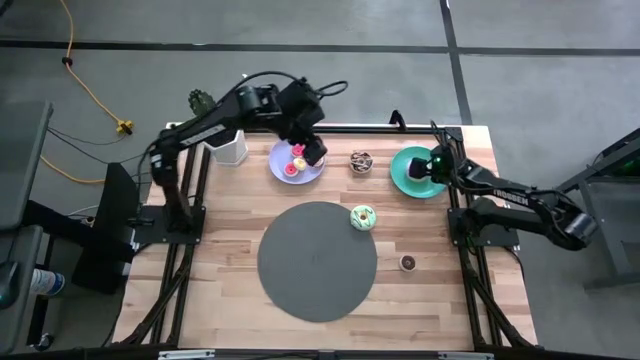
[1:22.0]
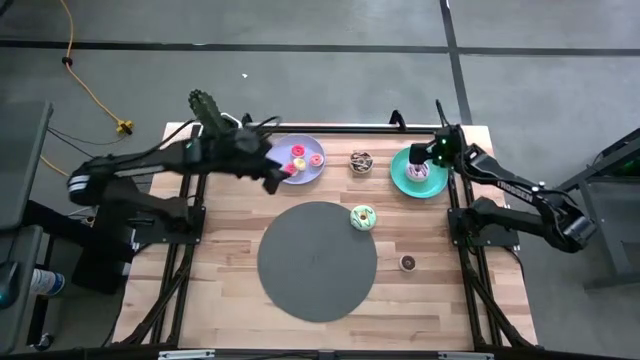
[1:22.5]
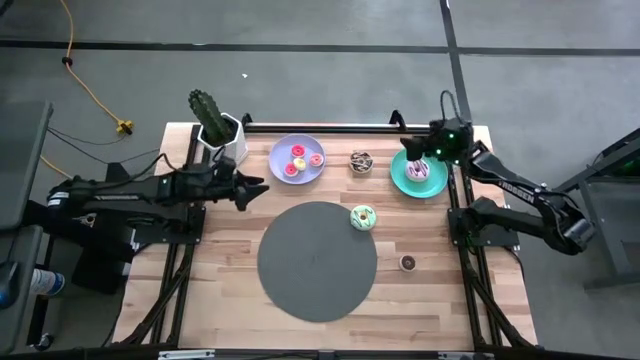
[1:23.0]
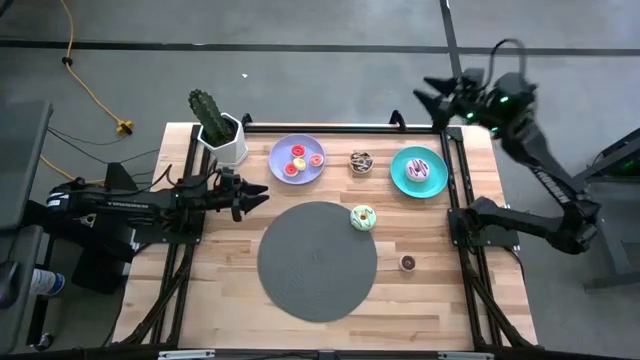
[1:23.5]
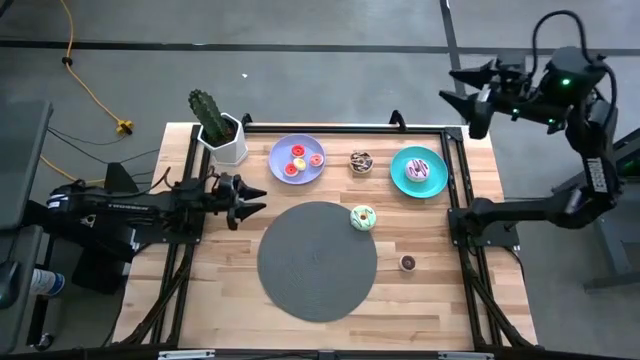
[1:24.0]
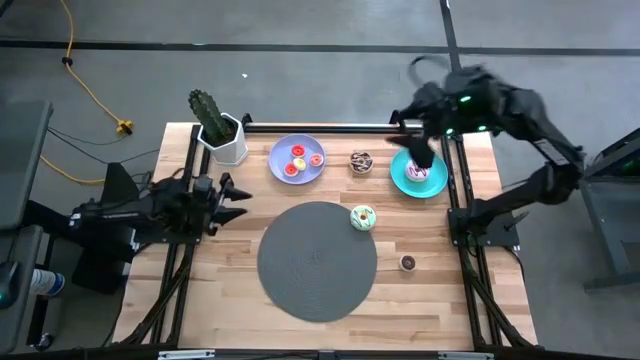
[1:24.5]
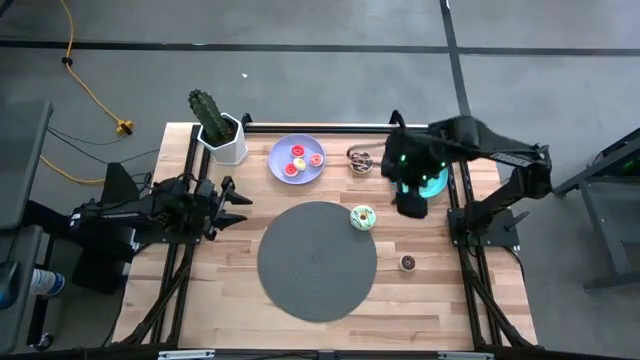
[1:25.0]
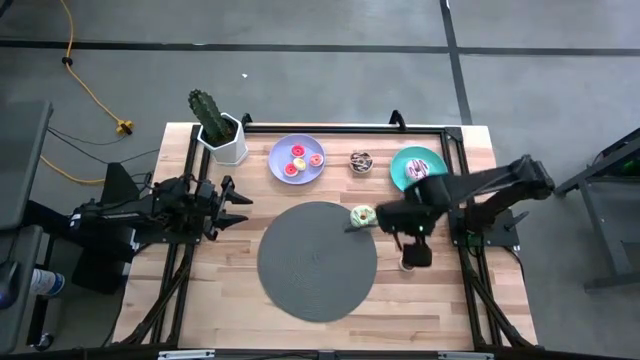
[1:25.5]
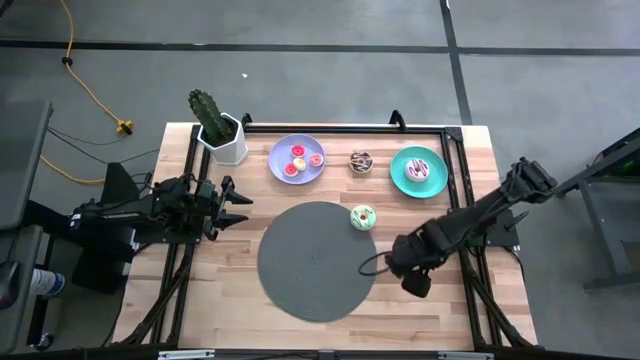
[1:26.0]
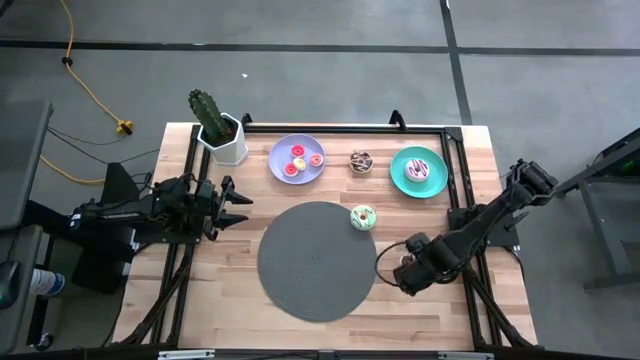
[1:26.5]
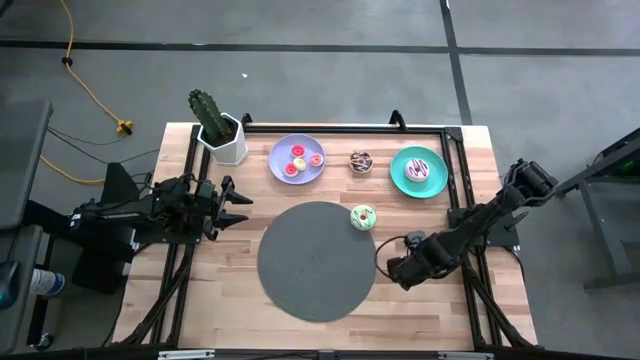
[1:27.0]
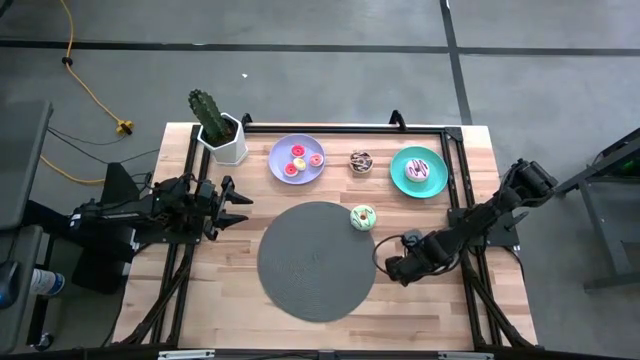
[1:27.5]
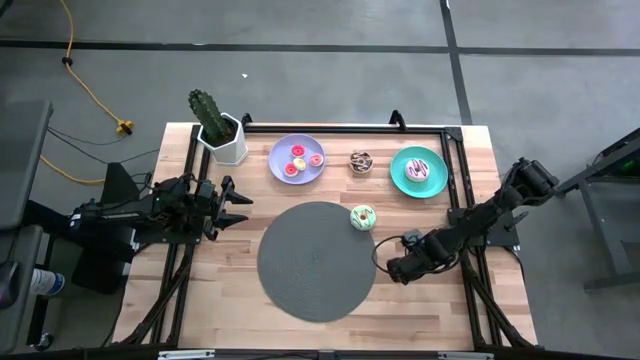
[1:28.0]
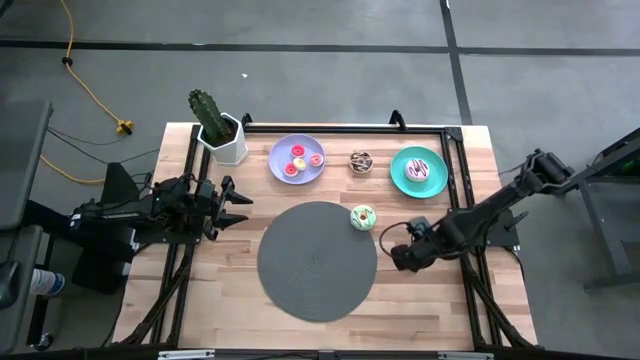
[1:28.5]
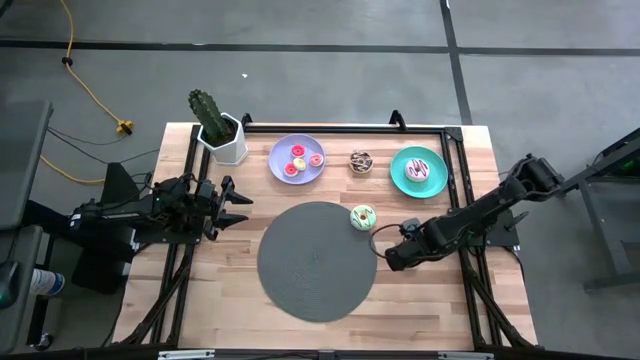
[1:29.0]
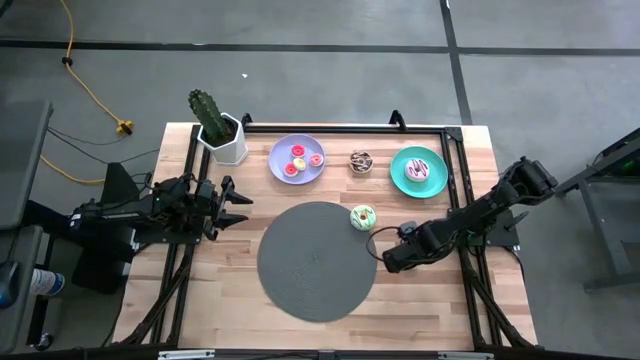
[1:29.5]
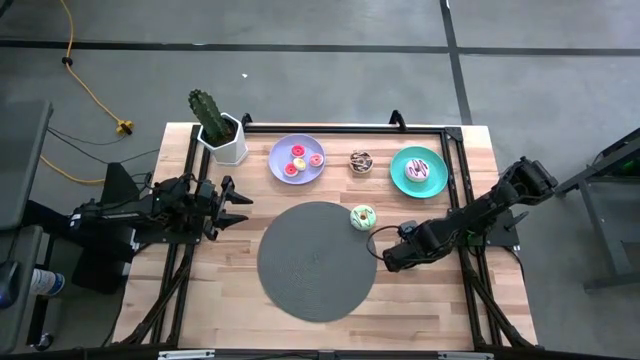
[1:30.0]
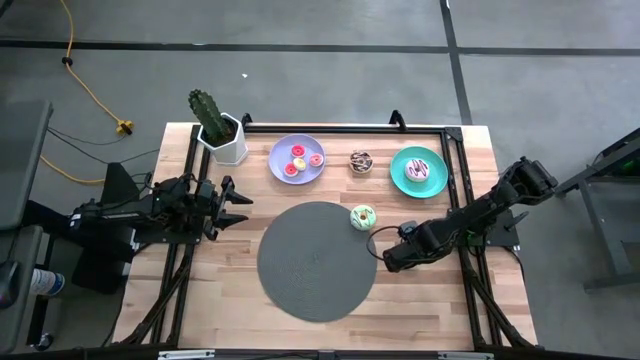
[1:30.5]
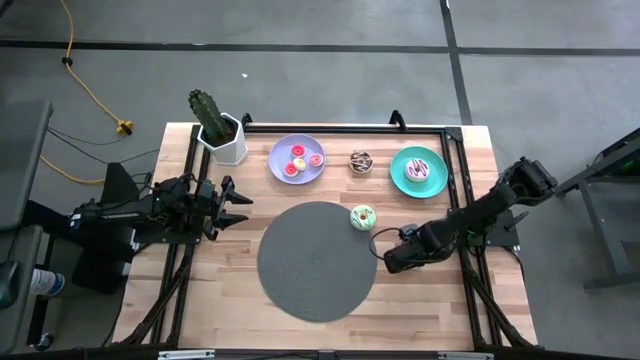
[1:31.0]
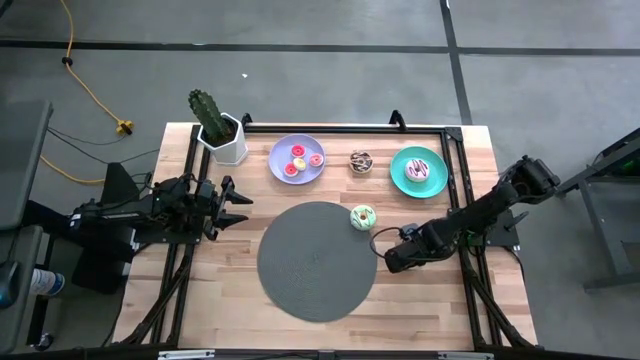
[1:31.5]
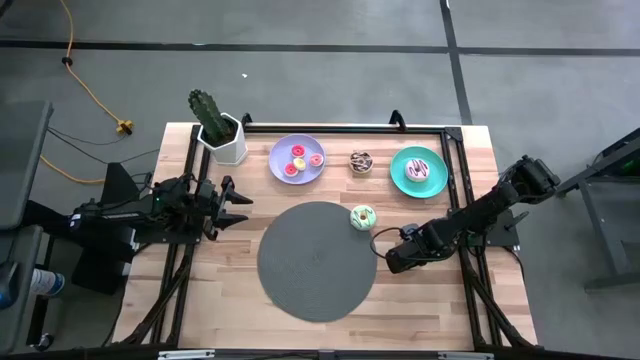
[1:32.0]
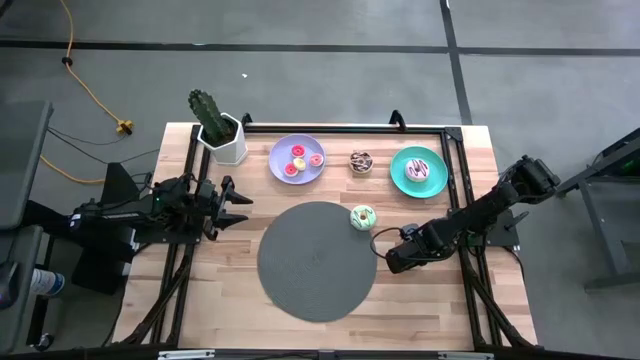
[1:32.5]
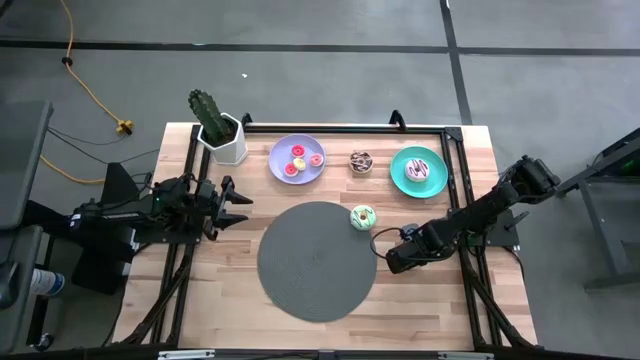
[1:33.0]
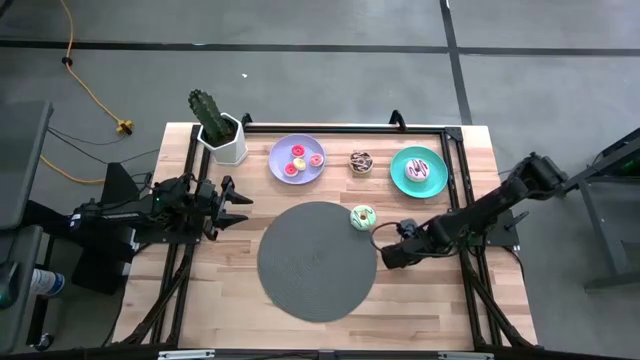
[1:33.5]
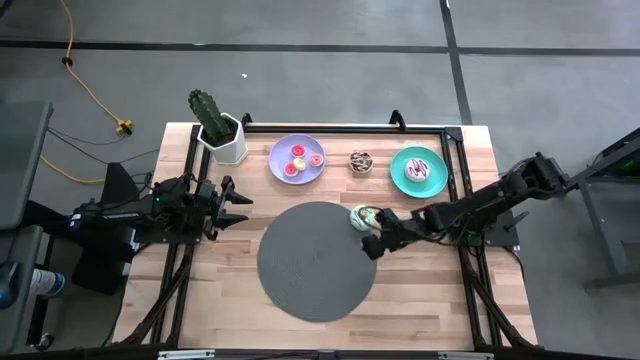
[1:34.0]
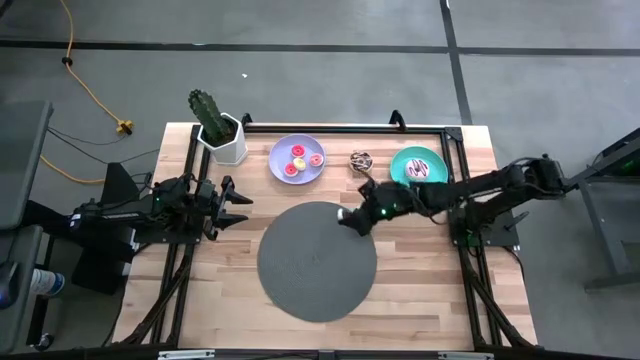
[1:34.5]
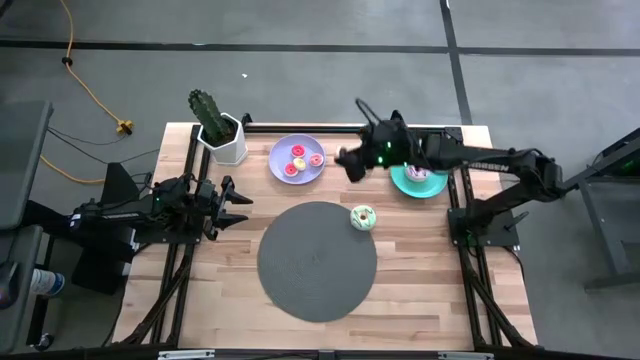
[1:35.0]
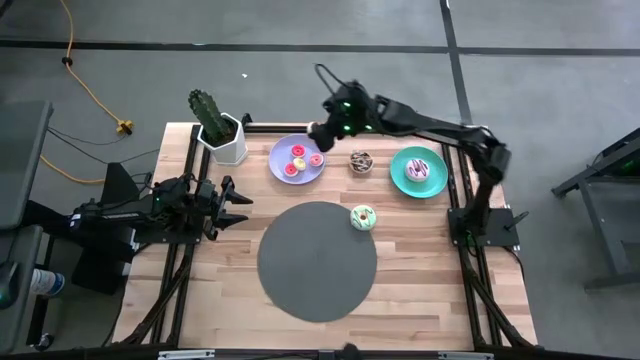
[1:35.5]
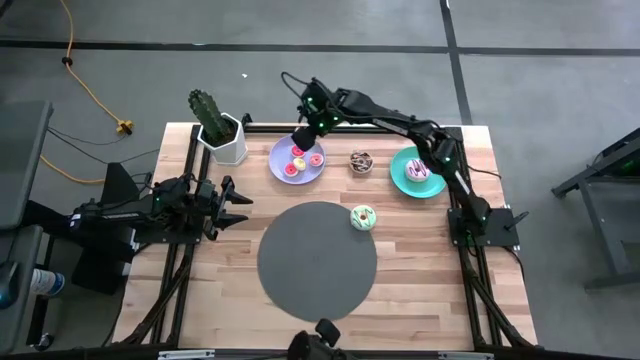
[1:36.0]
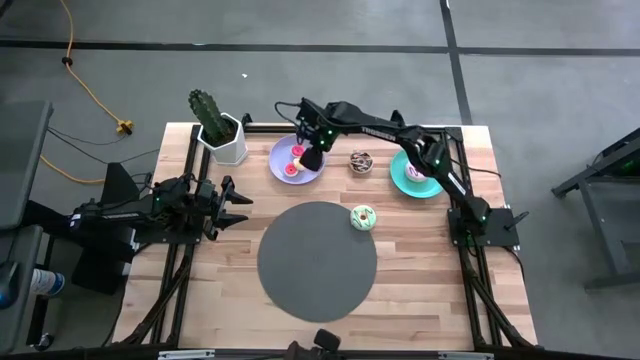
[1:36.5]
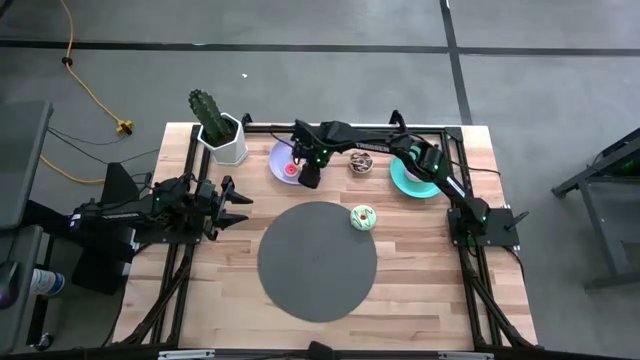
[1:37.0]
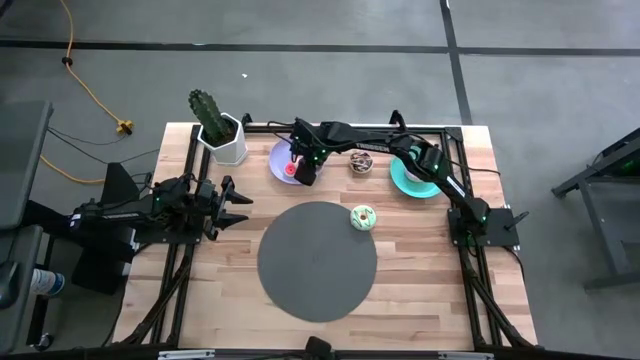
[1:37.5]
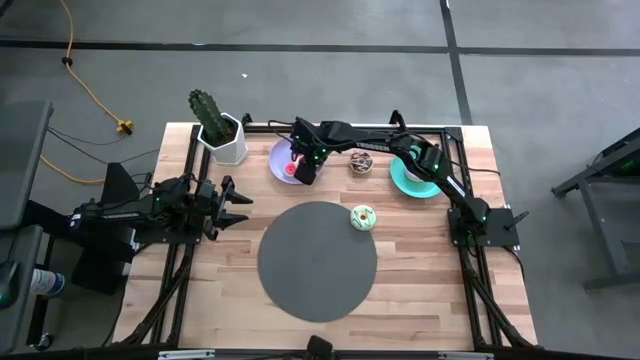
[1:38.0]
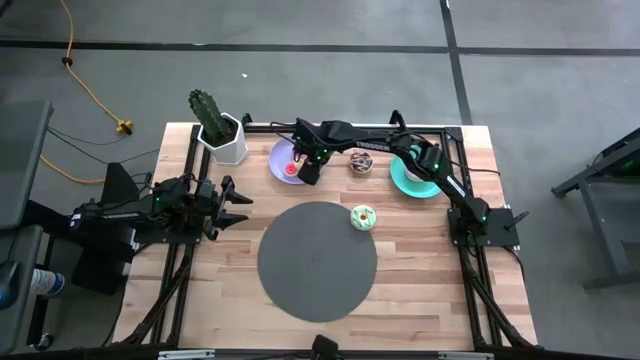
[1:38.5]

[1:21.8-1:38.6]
Task: Pick & Place donuts
Put the small brown and white doughnut on the purple plate

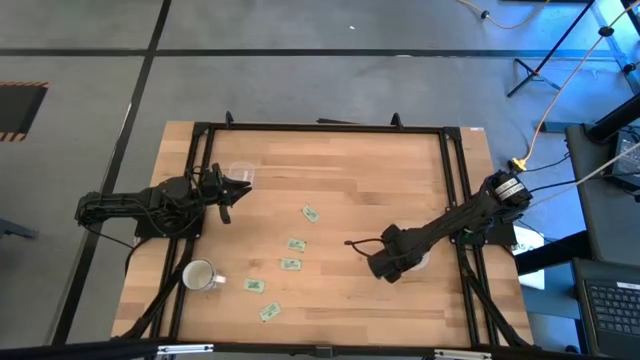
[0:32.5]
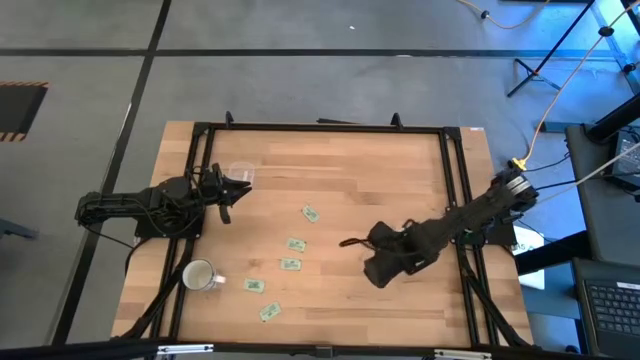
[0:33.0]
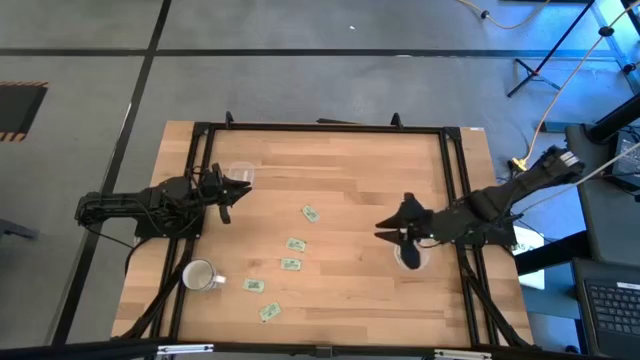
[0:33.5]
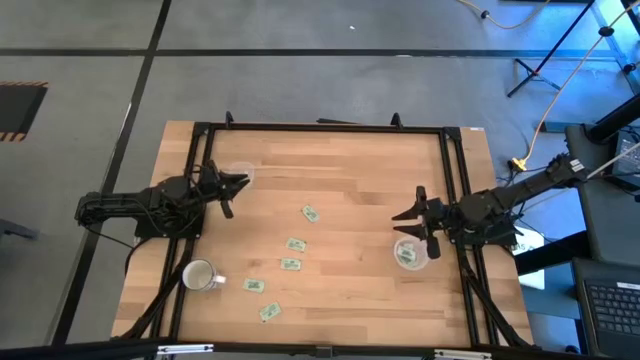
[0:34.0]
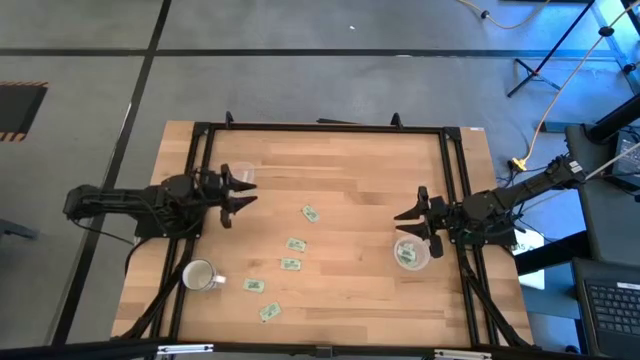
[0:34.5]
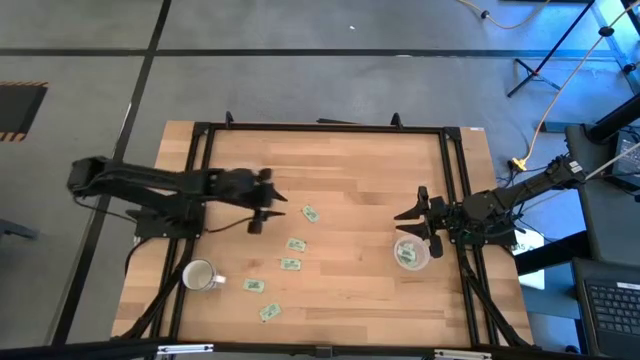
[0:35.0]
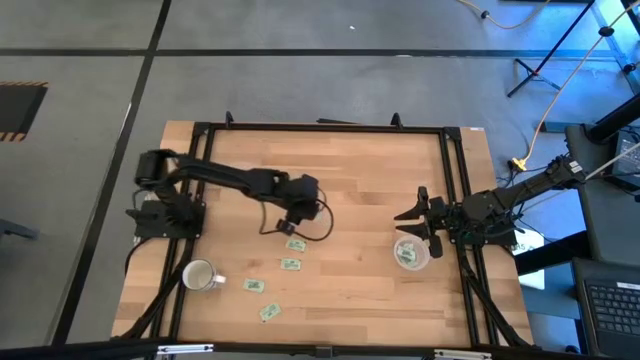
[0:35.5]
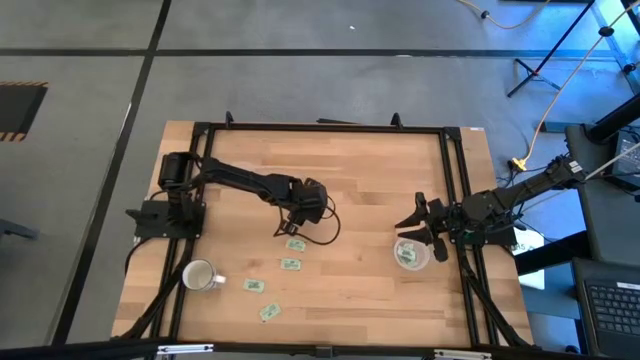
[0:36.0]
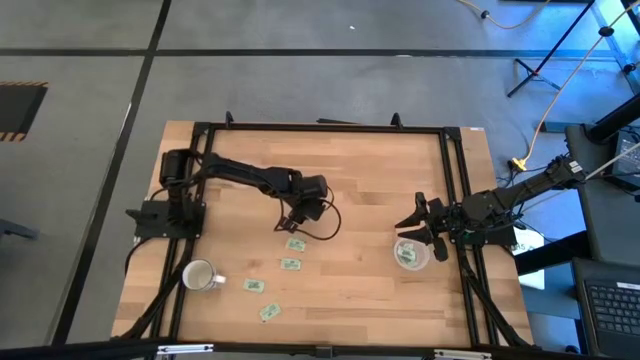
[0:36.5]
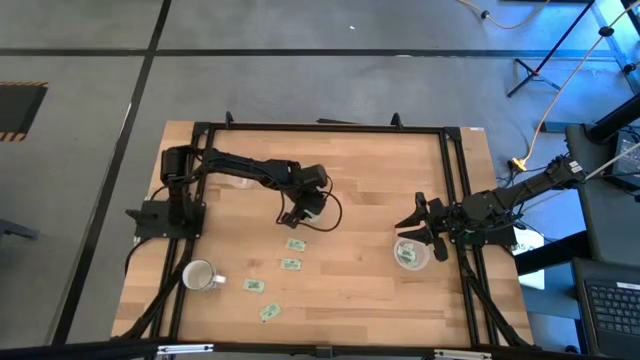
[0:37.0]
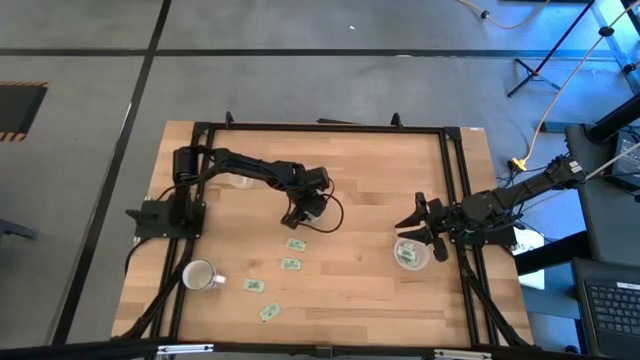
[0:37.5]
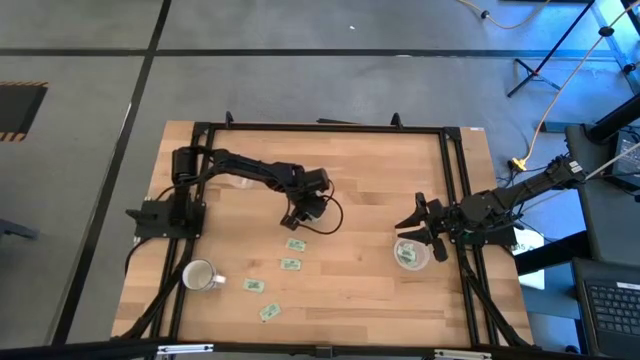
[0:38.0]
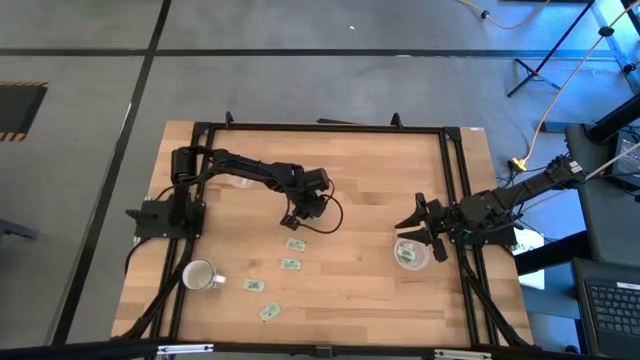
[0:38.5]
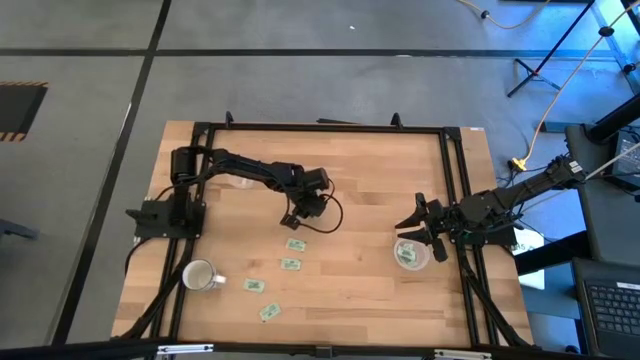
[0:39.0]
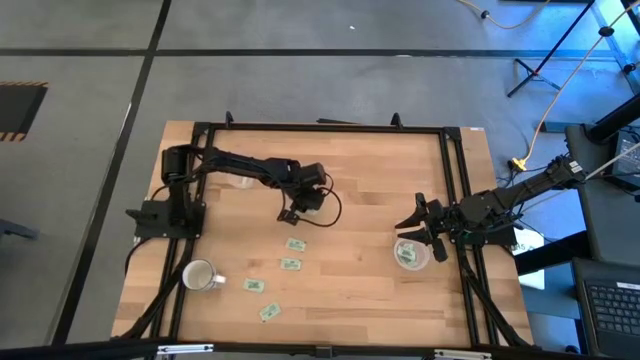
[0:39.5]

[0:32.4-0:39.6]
Task: Pick and place Stevia / Truvia into bins
Put the stevia packet into the square transparent container
